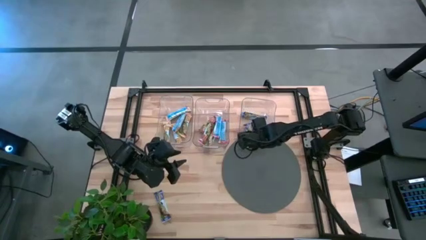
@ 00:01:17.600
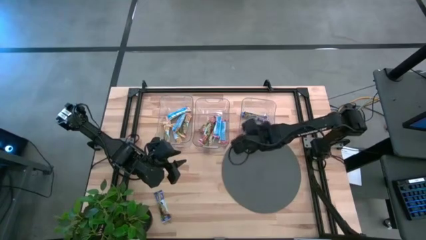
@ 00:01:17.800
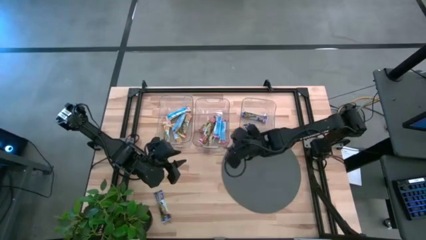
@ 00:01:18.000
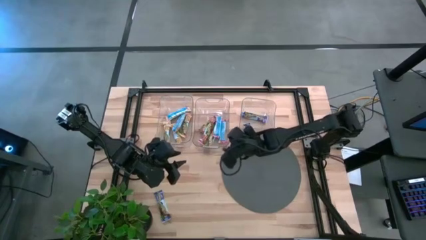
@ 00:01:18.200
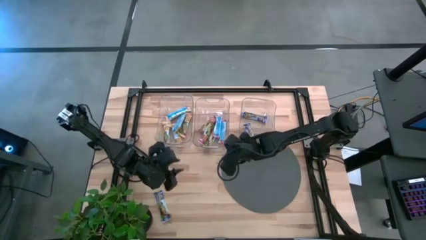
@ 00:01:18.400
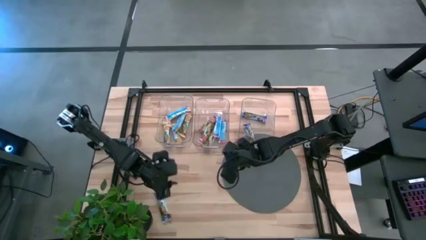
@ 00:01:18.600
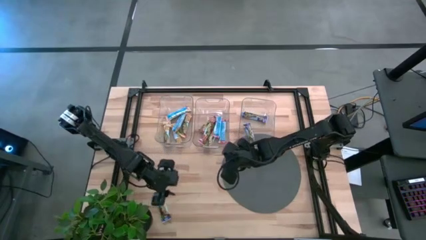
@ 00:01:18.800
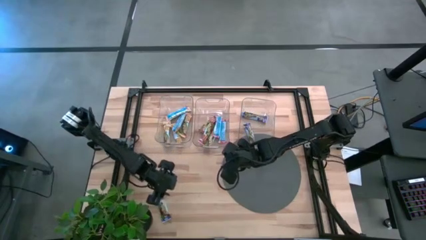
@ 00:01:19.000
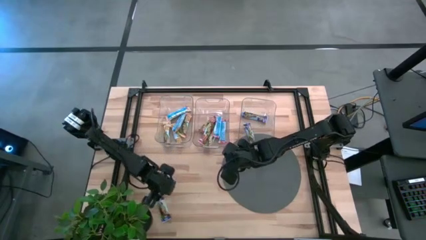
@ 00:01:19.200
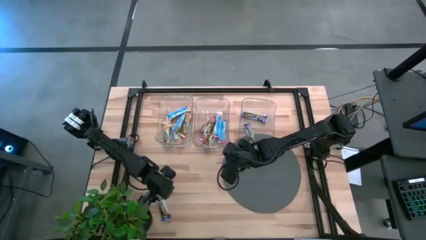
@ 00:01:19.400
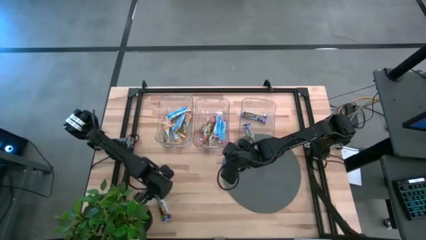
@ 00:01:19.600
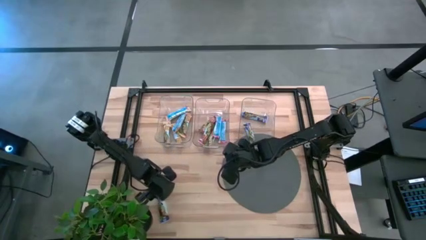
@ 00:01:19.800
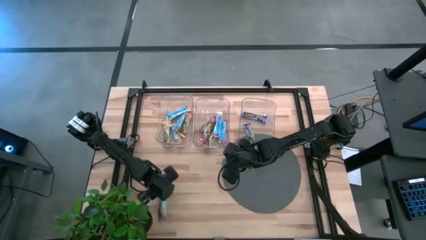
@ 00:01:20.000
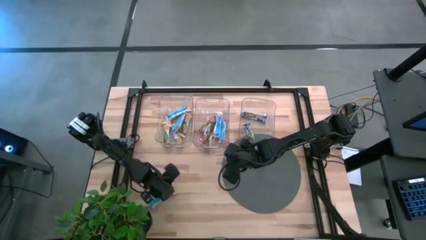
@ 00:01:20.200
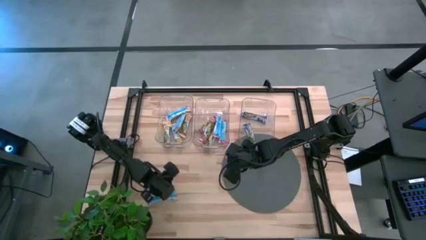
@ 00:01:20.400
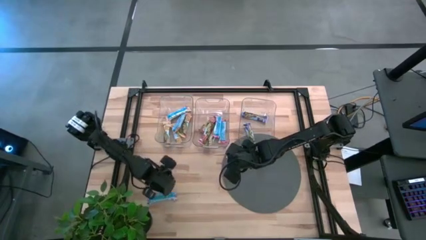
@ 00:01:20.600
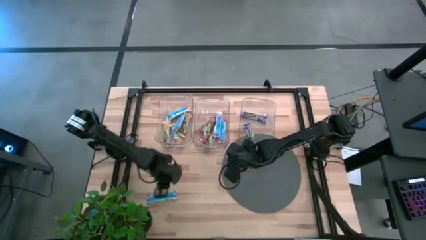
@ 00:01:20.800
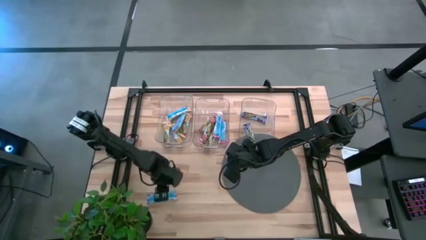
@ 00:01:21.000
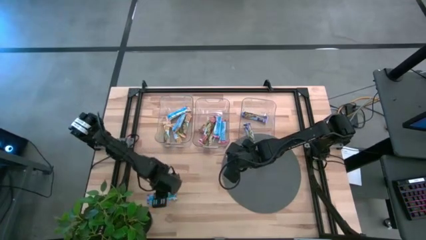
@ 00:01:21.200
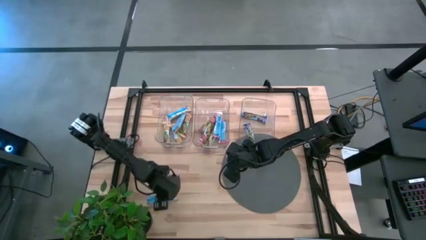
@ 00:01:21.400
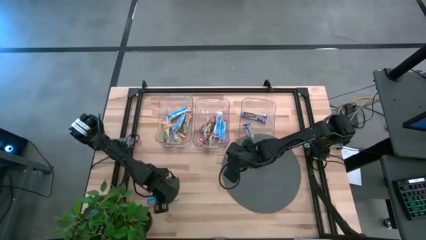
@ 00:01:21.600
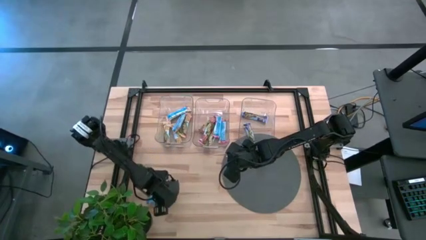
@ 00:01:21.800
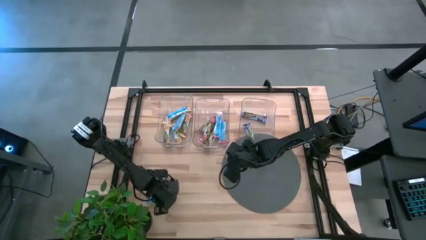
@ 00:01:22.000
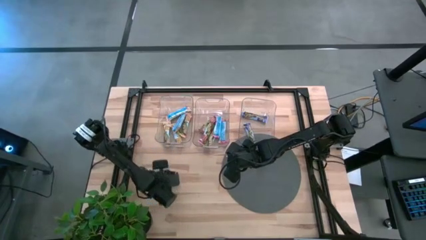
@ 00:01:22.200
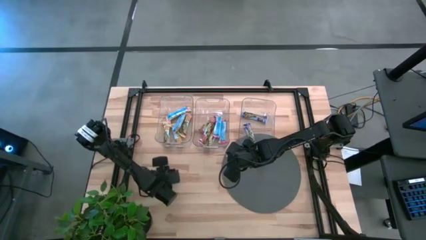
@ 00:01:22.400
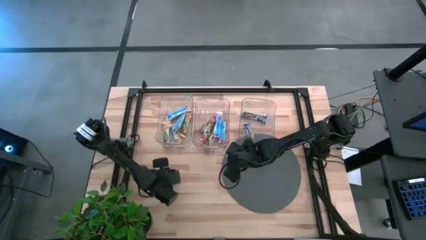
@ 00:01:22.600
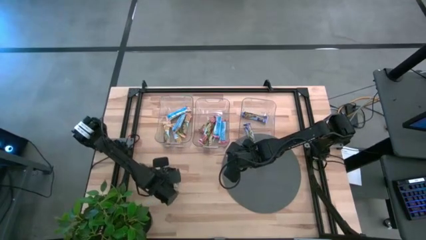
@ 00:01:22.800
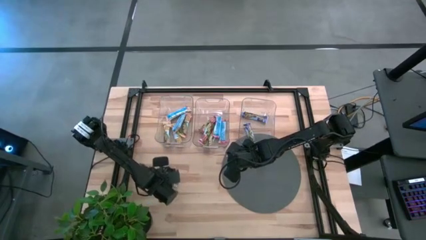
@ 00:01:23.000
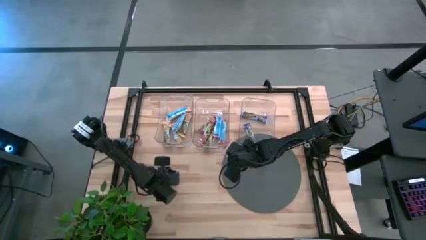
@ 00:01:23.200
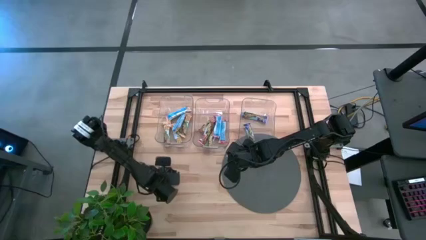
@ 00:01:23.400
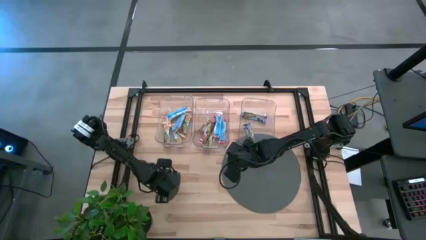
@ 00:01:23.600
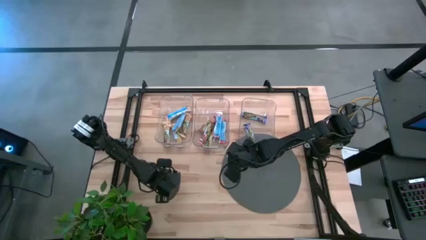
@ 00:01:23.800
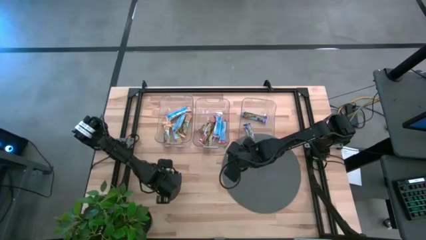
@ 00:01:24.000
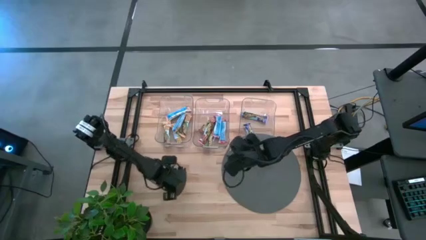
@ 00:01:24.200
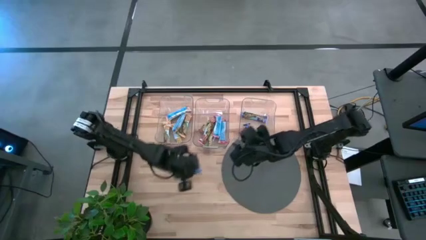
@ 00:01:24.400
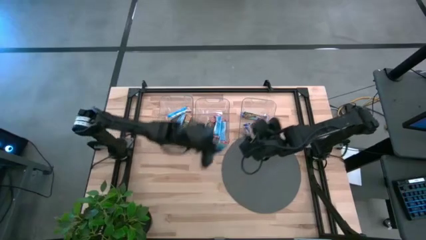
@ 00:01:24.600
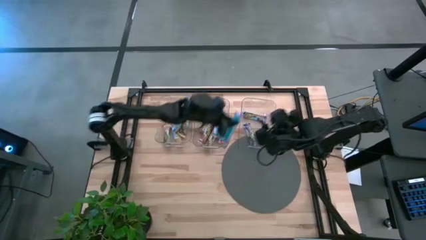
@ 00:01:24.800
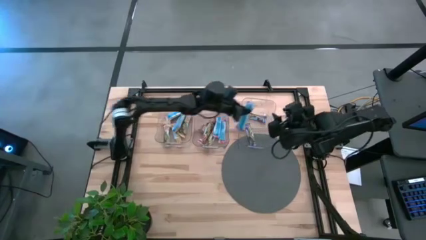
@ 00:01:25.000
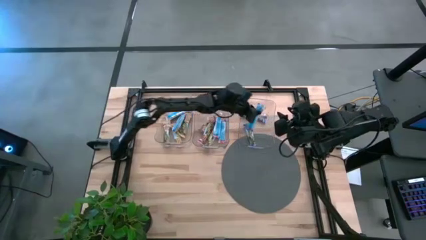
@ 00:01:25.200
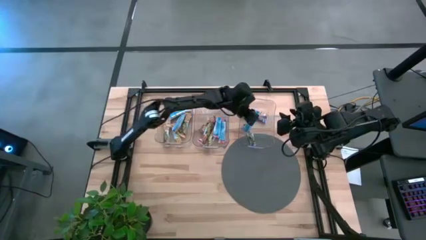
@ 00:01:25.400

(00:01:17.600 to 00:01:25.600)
Task: Pick and place Granola Bars by type
Put the blue granola bar into the right transparent bin

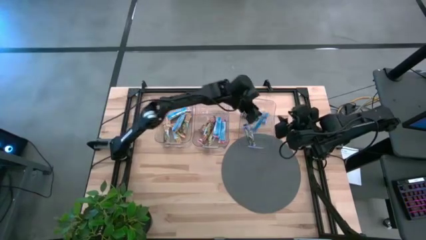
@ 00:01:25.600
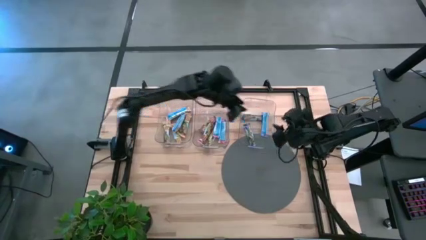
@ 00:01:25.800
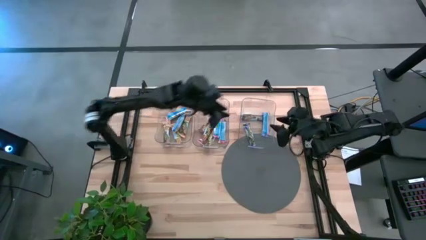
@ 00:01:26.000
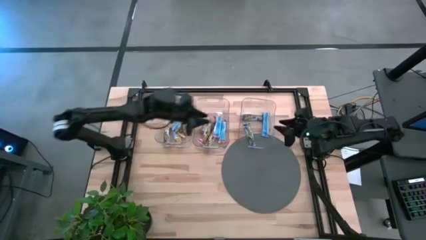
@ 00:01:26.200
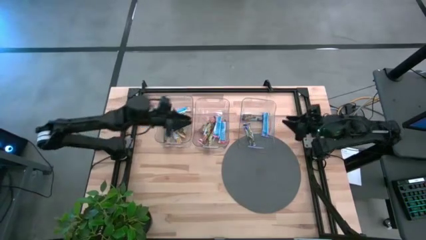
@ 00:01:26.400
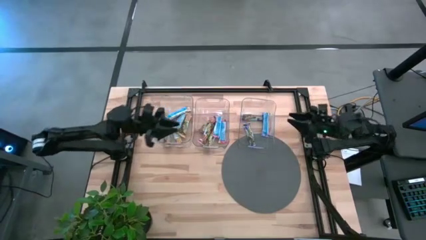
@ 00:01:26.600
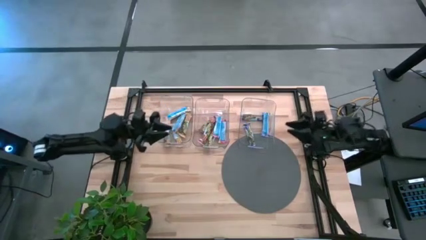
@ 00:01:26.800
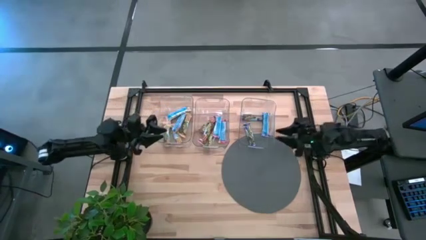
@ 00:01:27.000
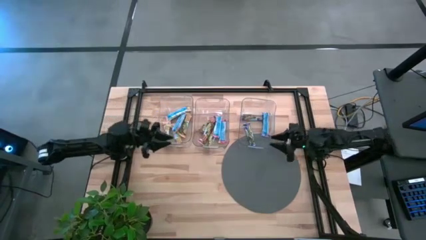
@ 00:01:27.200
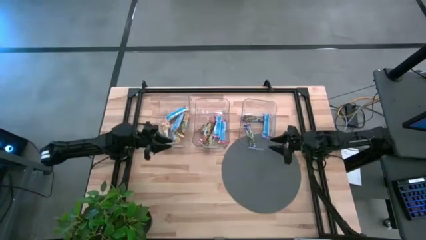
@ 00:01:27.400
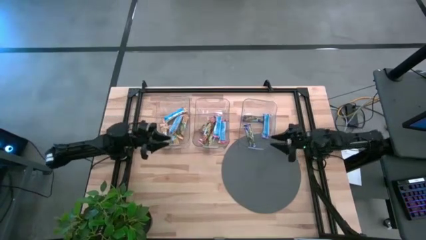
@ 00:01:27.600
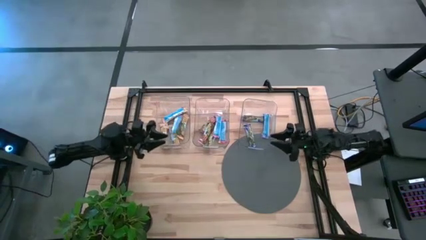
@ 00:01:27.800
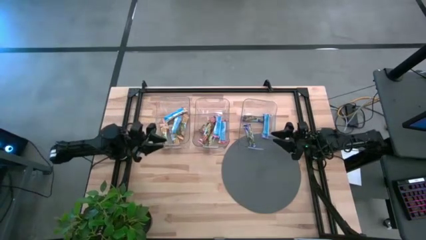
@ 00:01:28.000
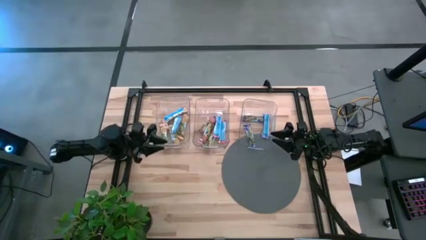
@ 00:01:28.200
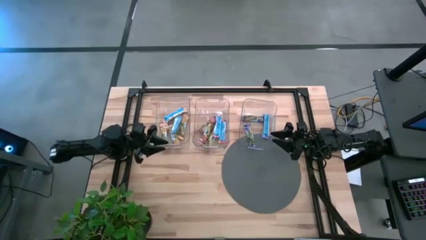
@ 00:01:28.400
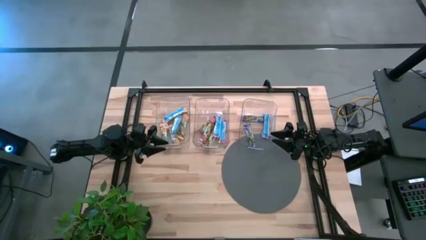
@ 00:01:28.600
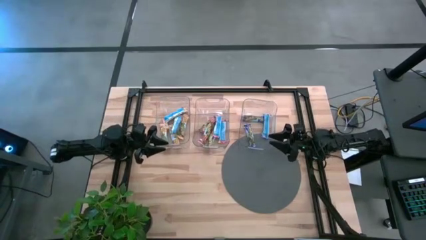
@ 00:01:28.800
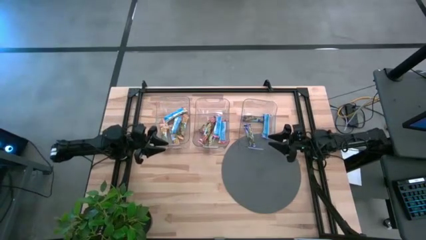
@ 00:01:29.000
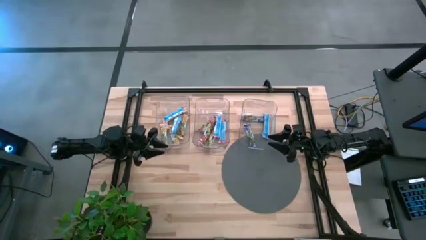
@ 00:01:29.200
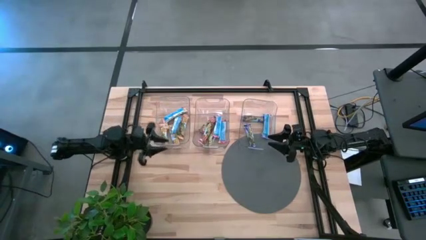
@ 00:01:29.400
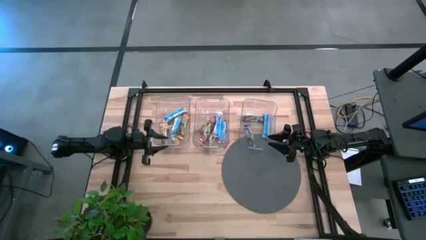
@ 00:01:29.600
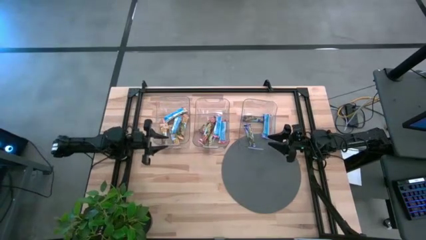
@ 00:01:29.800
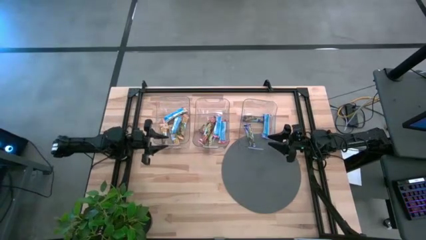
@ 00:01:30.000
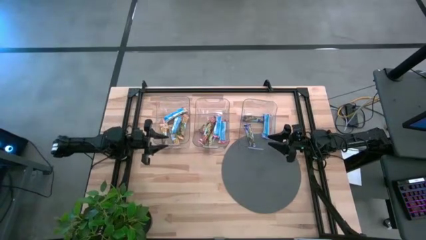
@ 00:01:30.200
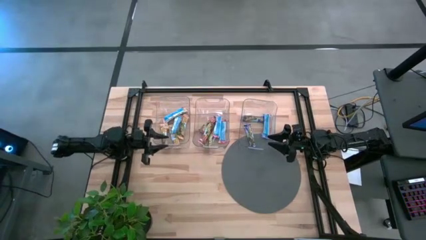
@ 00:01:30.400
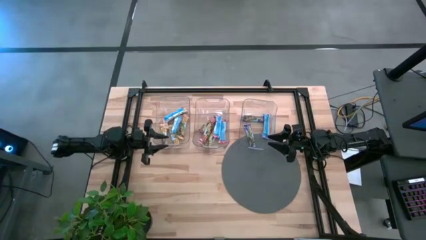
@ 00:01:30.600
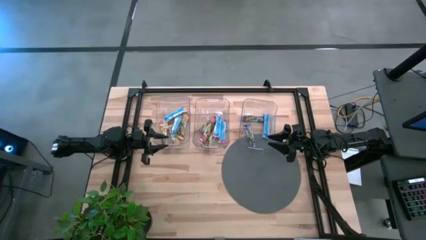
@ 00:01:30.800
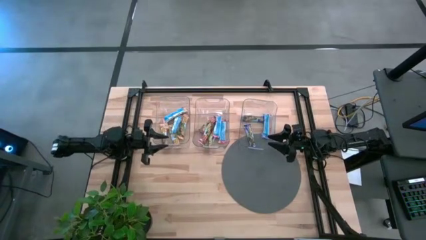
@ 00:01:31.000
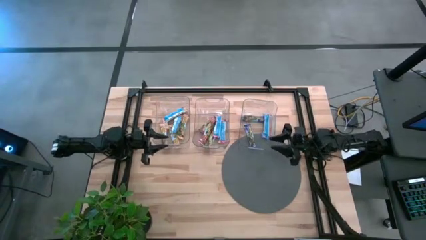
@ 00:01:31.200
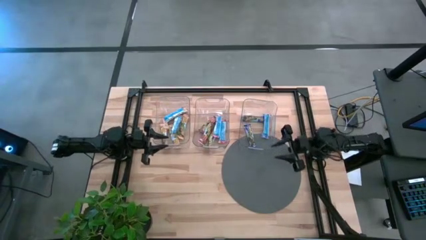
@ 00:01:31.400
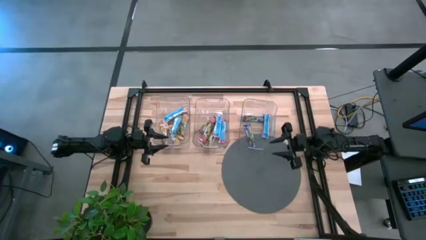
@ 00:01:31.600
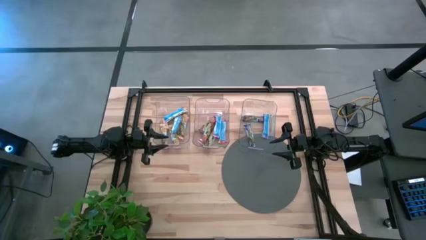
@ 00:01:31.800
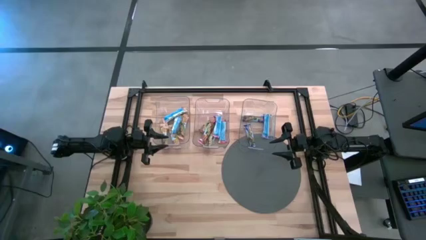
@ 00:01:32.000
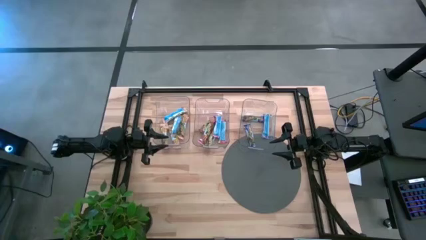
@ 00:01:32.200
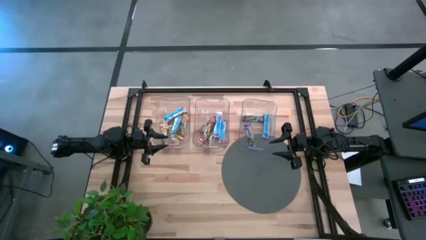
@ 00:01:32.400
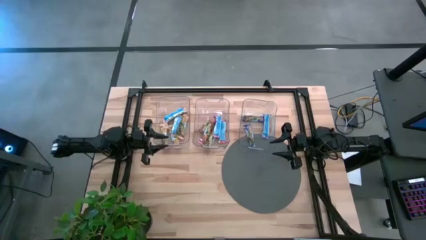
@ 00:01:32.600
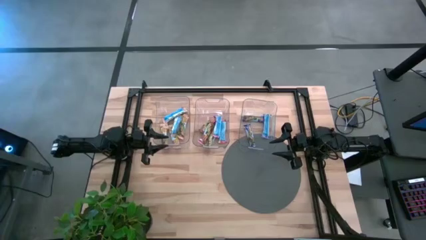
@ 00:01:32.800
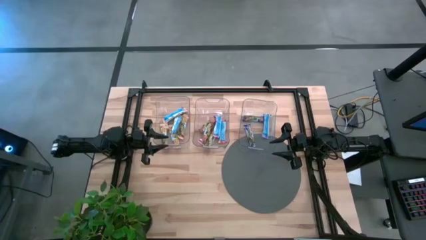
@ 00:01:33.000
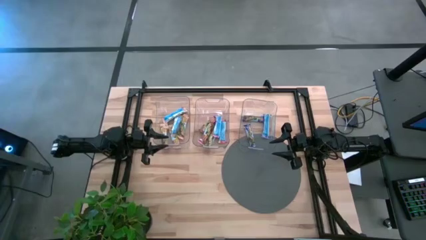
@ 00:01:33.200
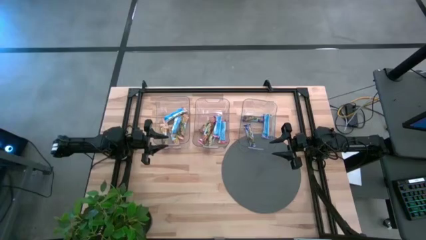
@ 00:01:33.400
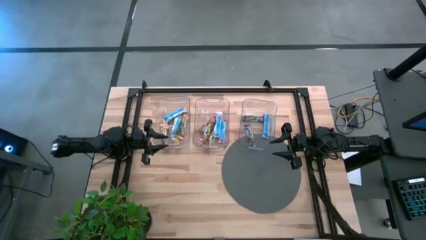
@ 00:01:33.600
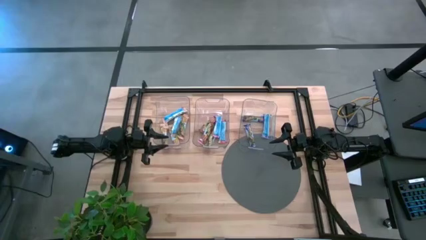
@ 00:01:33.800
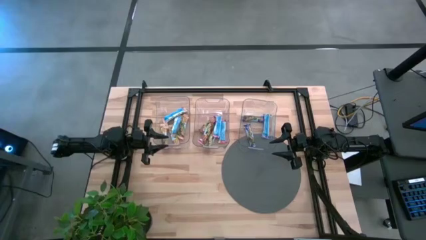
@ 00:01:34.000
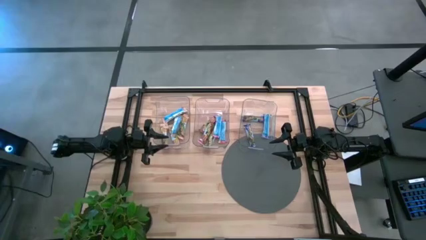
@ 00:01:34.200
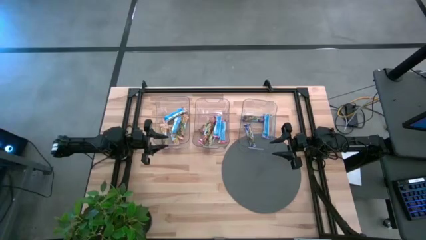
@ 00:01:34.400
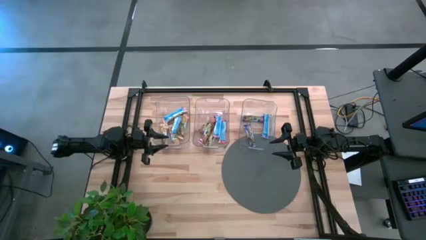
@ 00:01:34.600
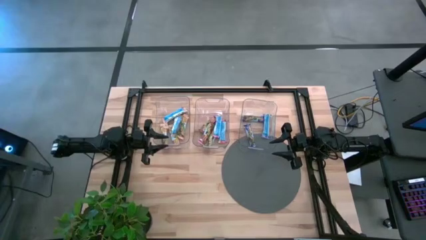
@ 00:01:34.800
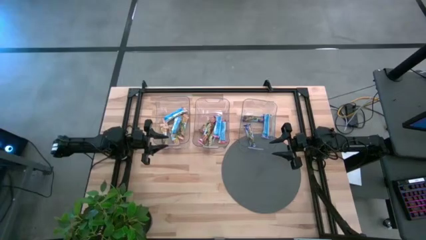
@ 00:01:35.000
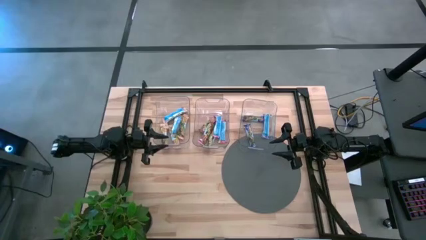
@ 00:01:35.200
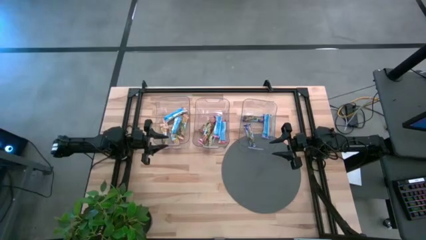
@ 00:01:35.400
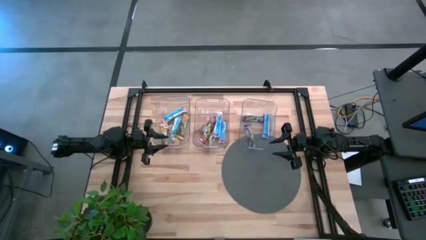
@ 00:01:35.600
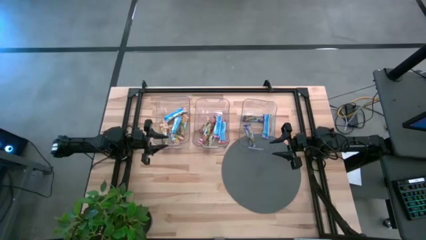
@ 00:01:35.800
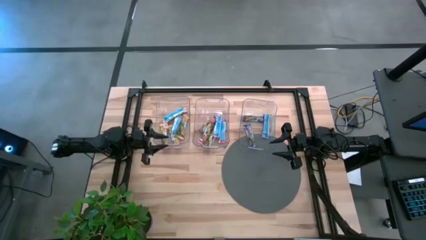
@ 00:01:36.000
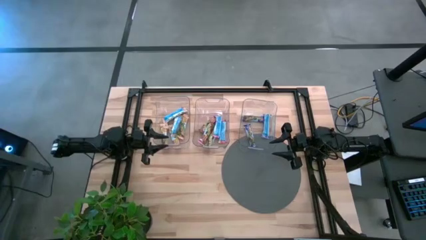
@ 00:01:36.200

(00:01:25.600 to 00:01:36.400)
Return to Home Position
